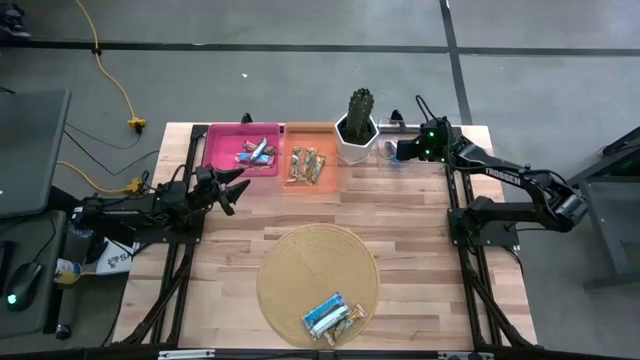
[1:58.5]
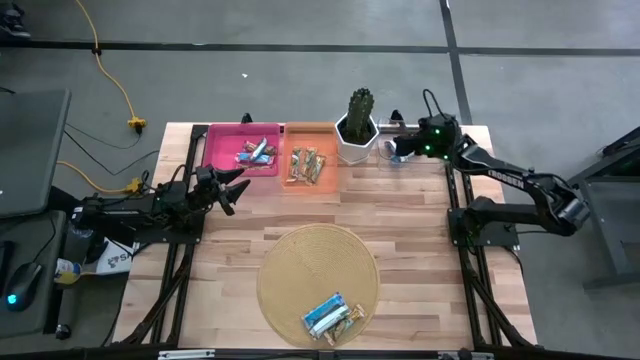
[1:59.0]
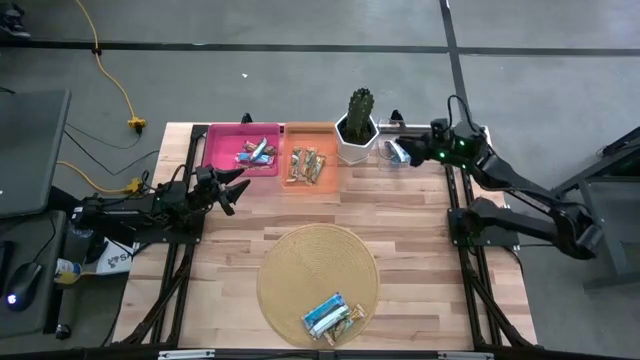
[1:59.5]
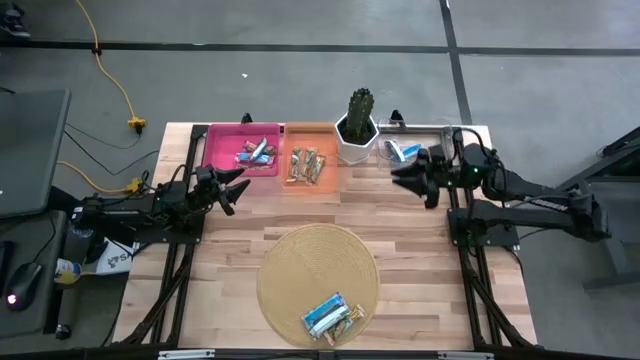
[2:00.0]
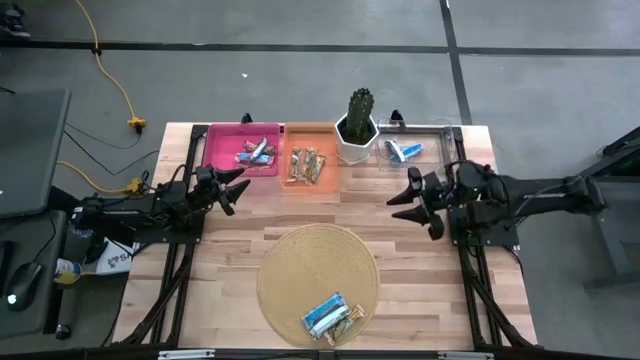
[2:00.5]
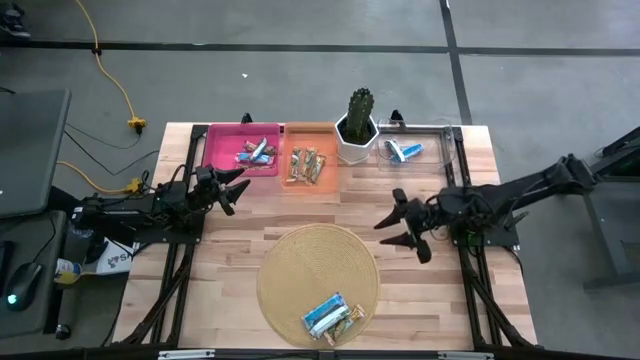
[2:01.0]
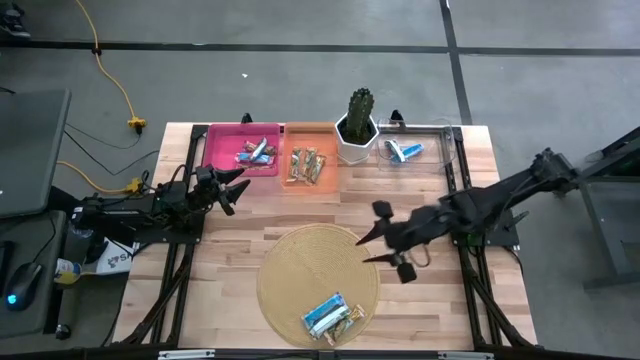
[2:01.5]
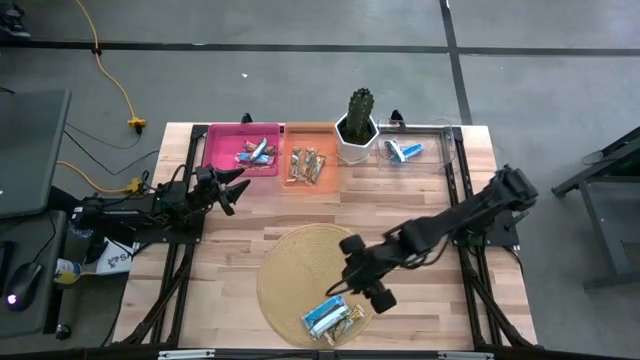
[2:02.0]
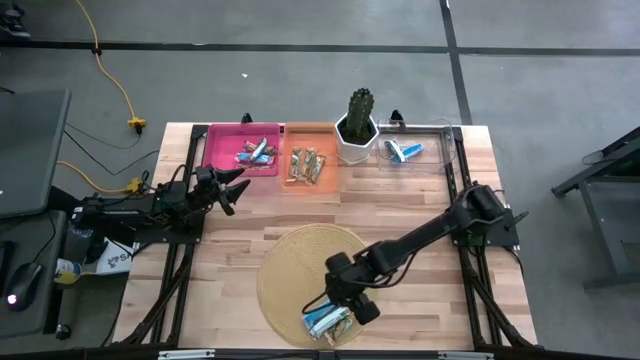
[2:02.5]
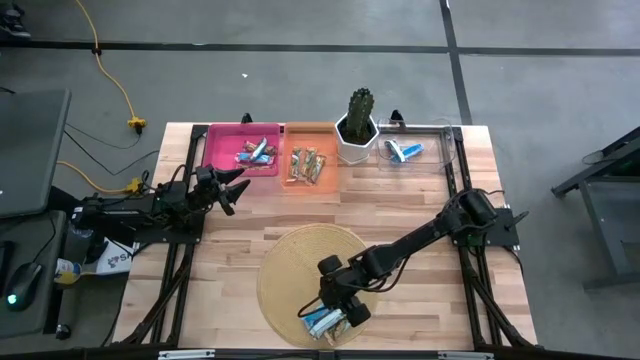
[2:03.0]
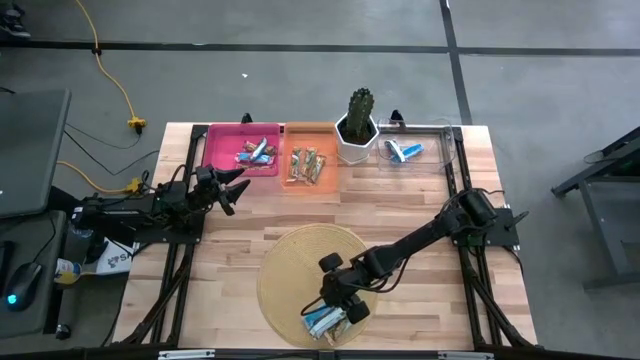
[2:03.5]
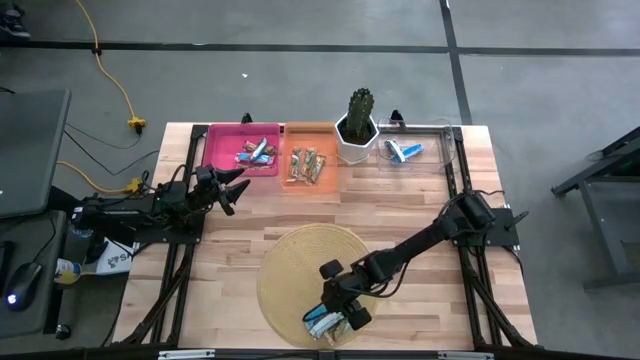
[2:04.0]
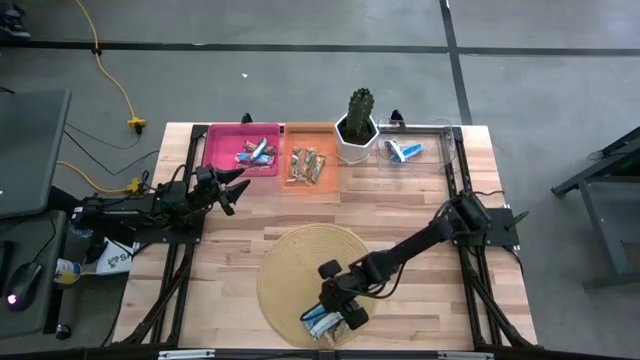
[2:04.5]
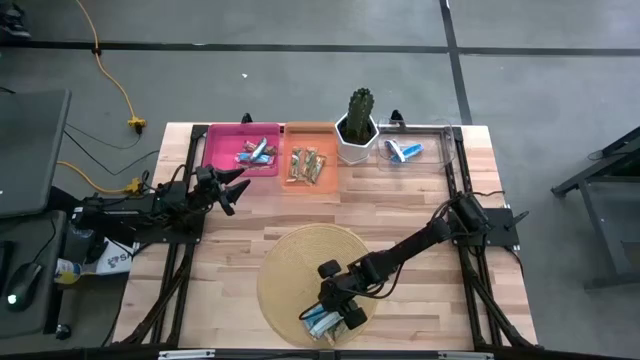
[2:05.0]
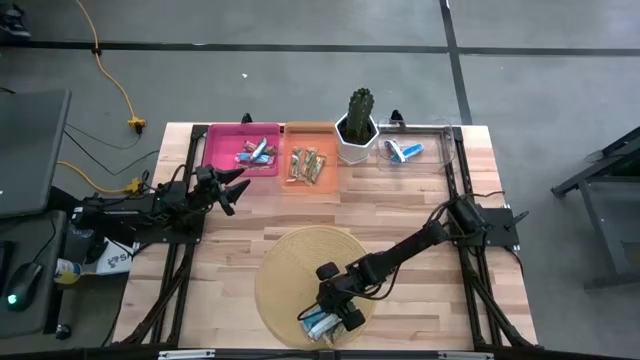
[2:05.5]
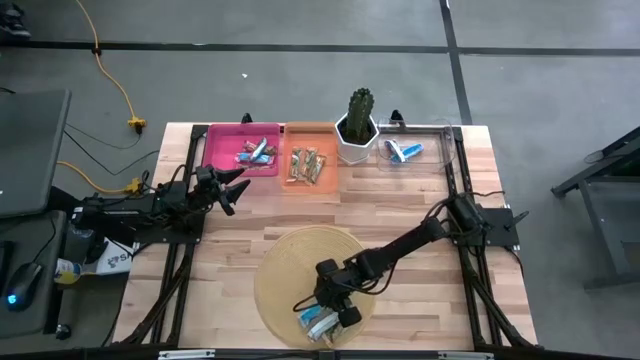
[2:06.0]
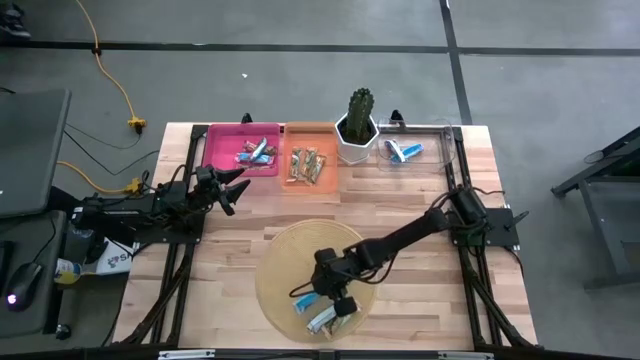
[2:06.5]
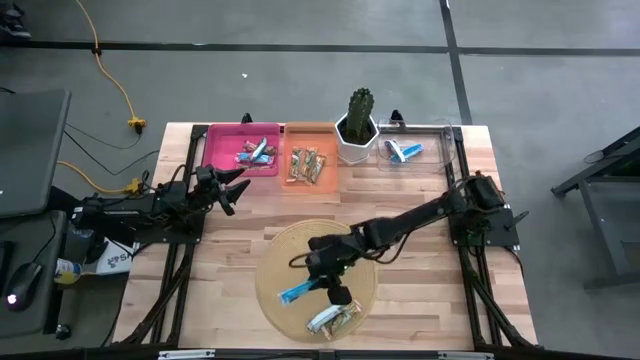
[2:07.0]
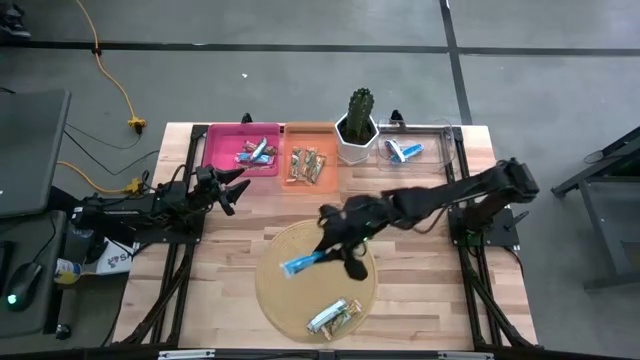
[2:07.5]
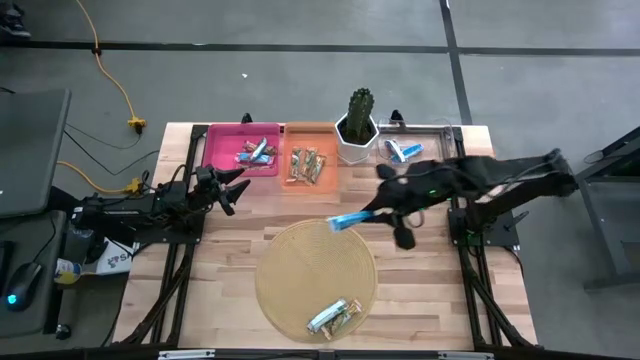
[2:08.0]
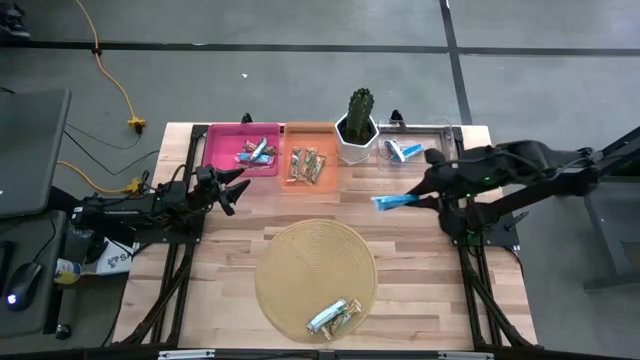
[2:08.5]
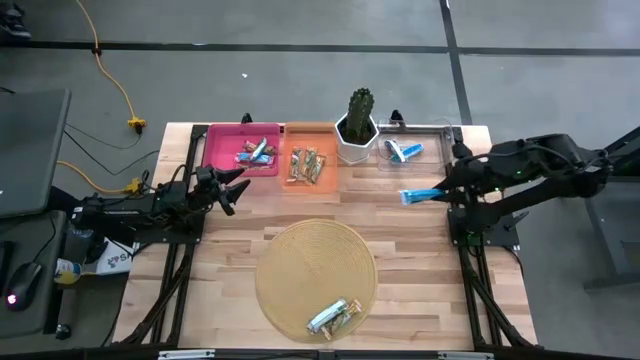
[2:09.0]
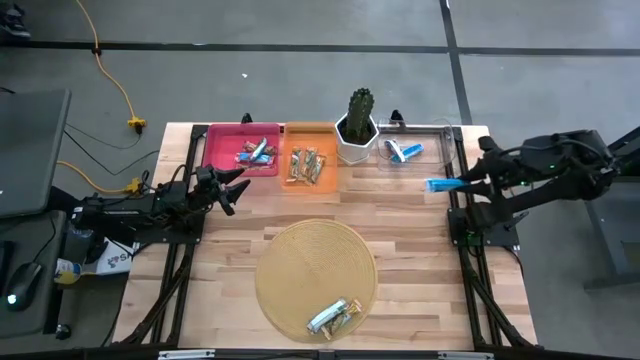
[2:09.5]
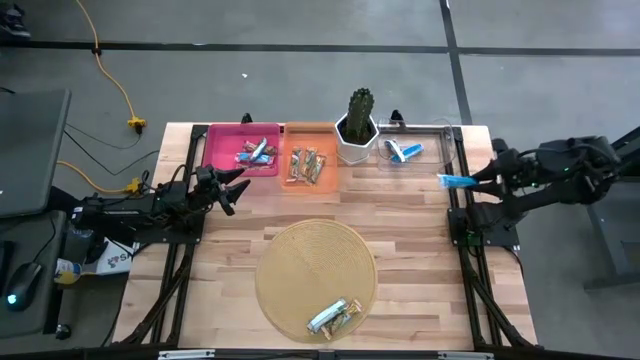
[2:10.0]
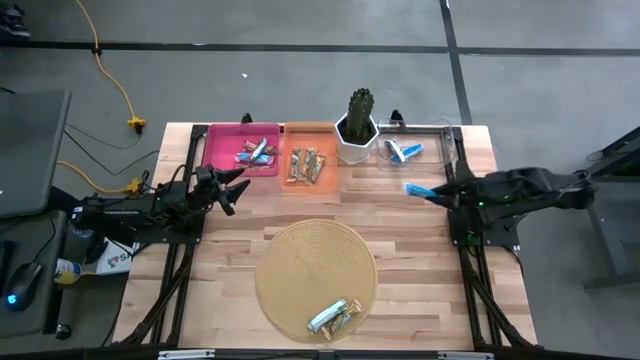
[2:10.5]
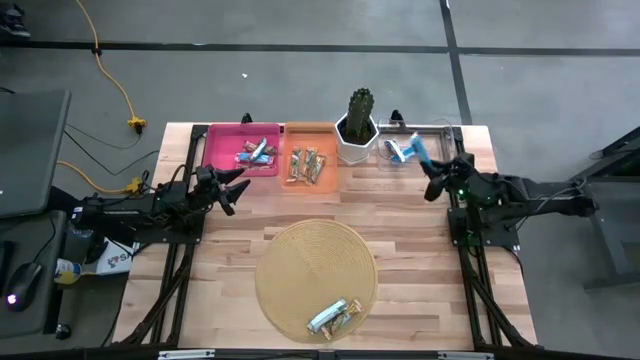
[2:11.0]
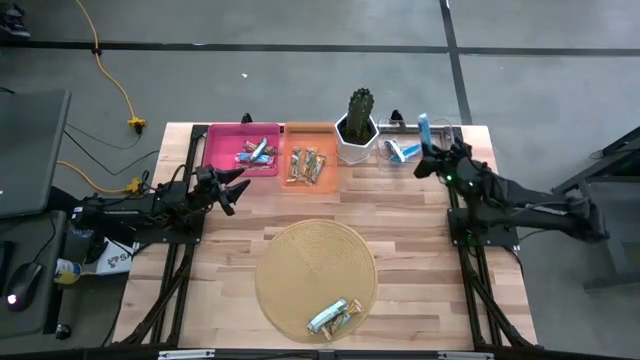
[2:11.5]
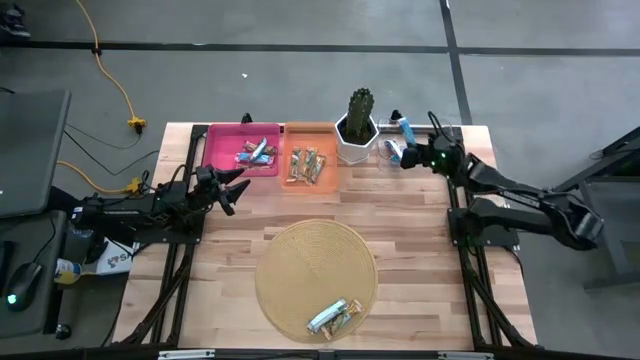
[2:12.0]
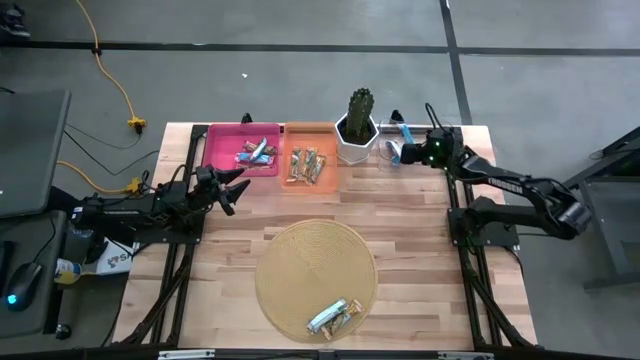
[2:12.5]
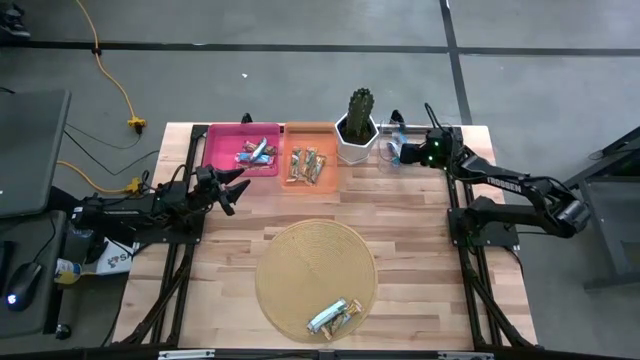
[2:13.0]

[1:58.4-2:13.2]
Task: Pick and place Granola Bars by type
Put the blue granola bar into the transparent bin

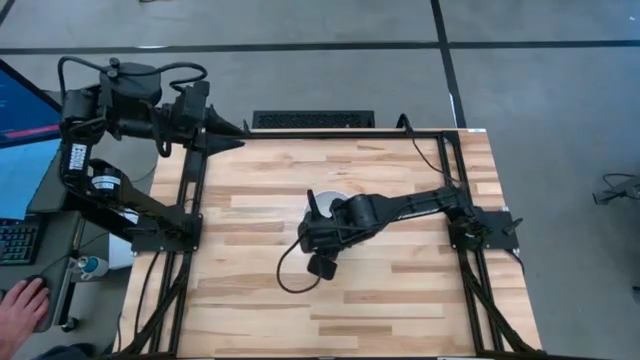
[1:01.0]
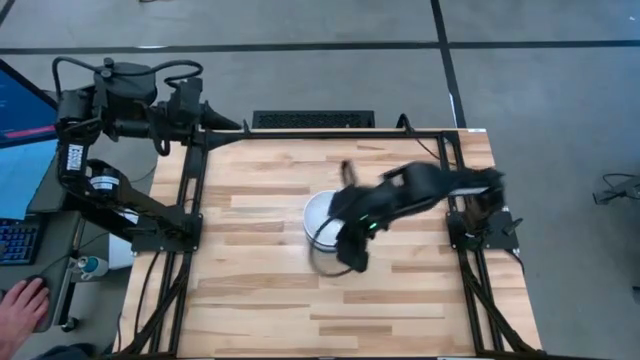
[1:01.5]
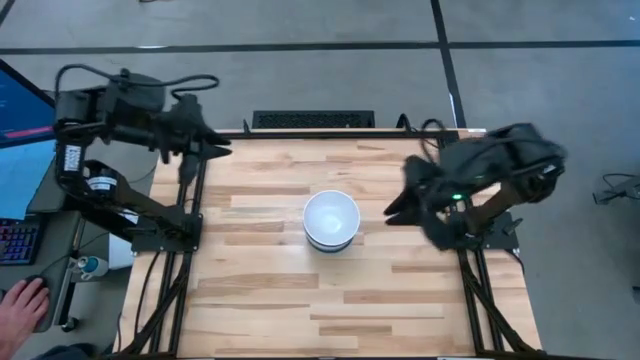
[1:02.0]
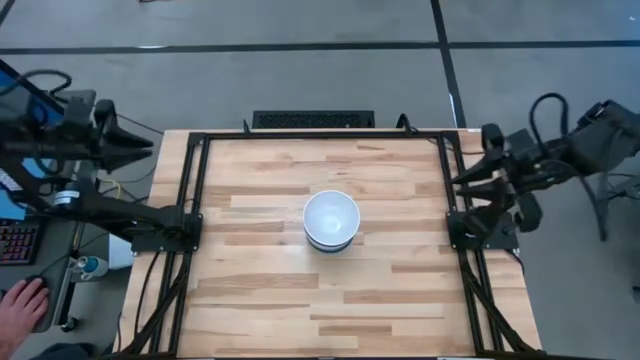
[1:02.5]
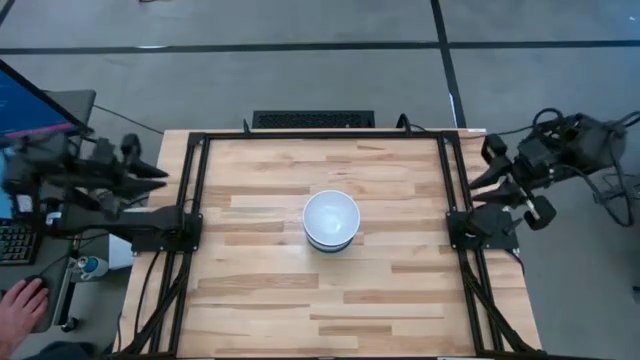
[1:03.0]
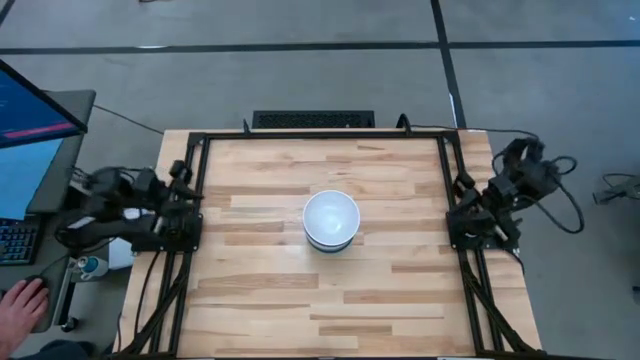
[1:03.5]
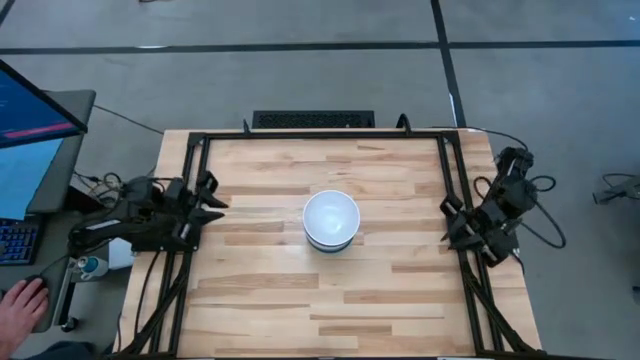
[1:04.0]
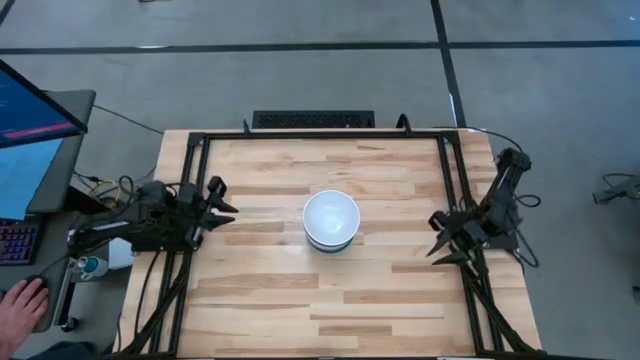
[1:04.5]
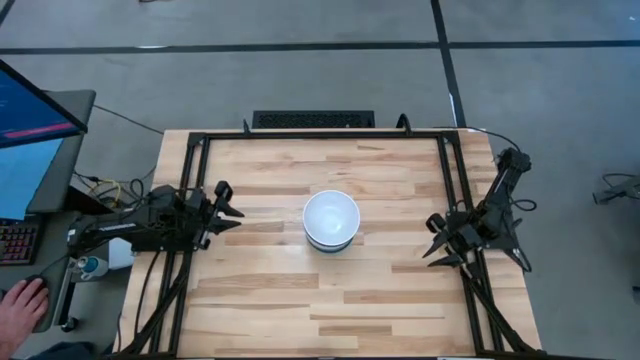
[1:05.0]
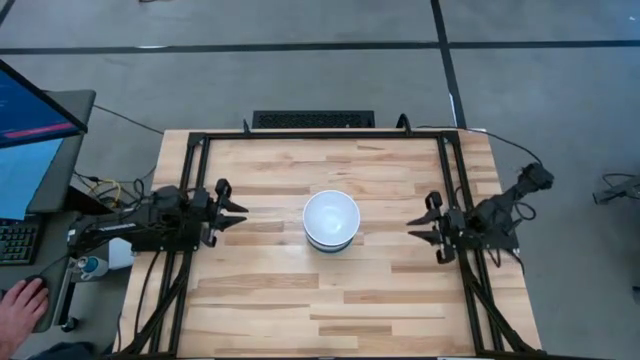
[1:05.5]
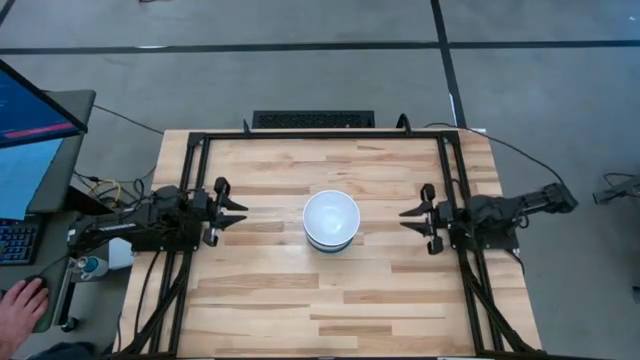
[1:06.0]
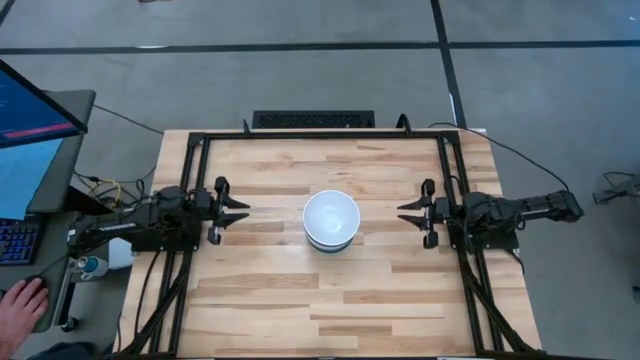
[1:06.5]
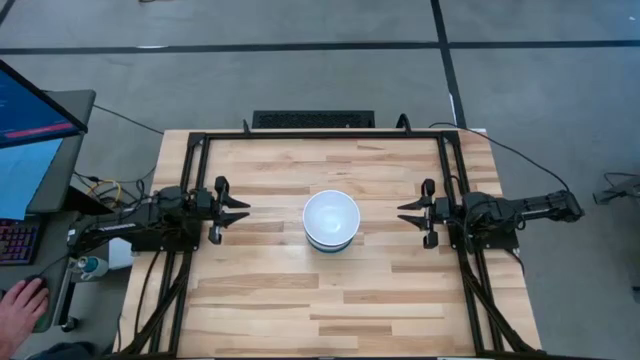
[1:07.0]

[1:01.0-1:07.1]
Task: Nest bowls inside each other
Return to Home Position
